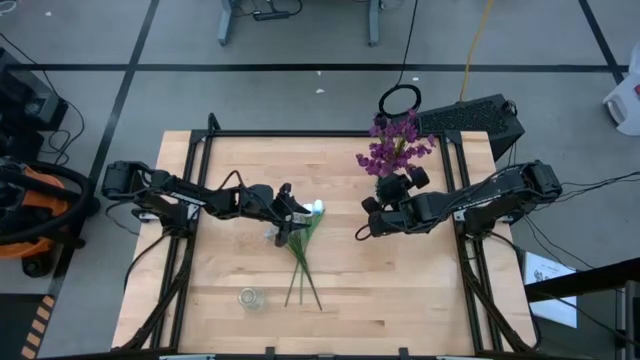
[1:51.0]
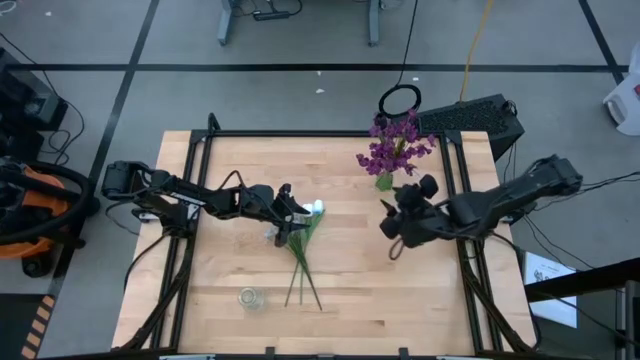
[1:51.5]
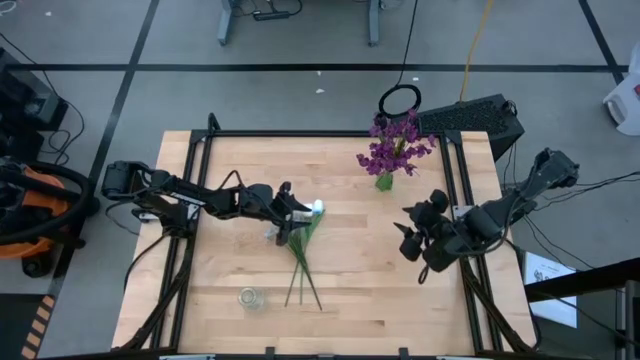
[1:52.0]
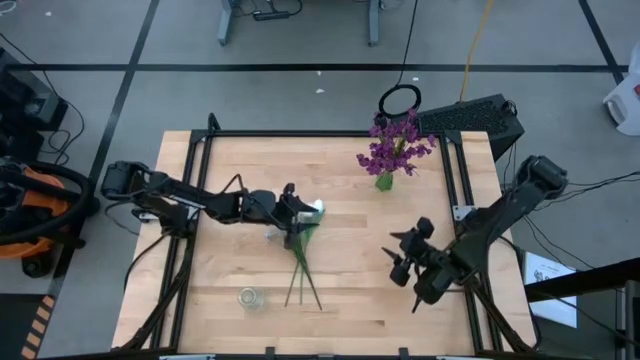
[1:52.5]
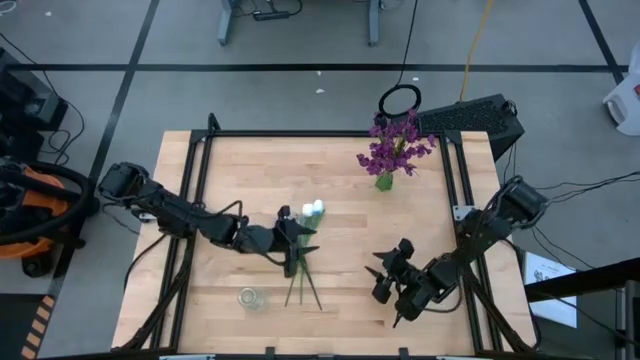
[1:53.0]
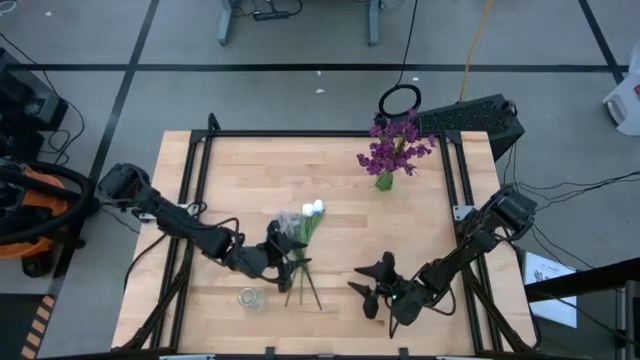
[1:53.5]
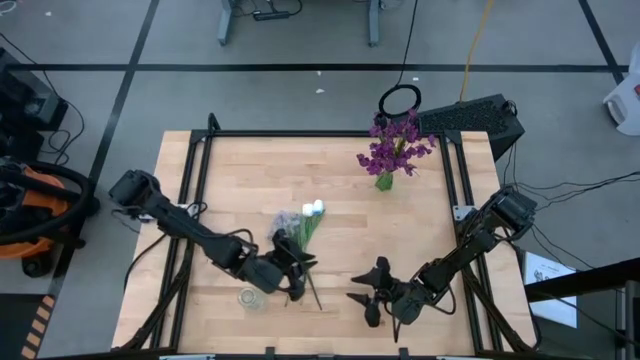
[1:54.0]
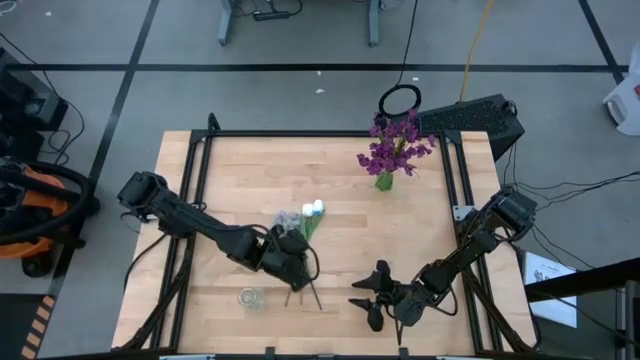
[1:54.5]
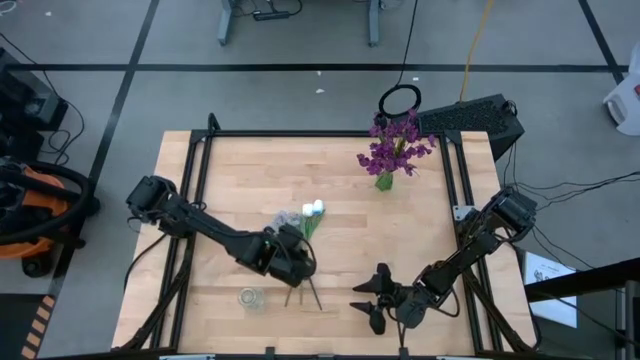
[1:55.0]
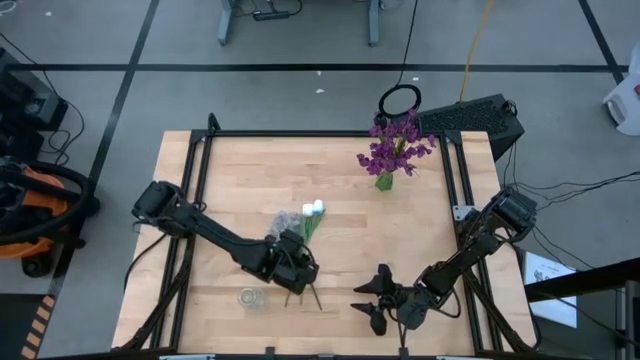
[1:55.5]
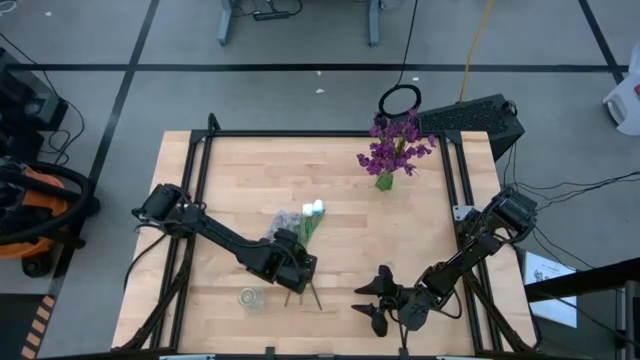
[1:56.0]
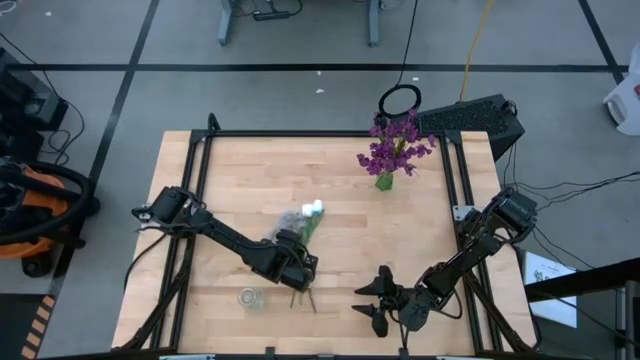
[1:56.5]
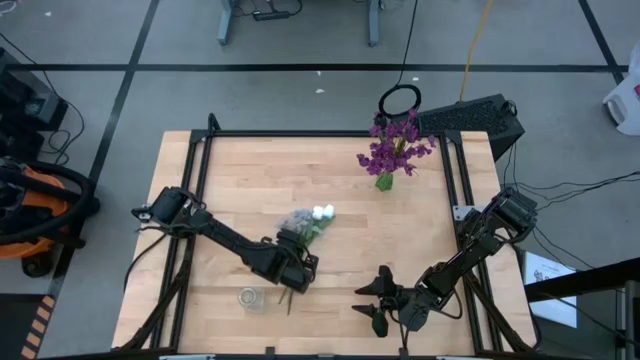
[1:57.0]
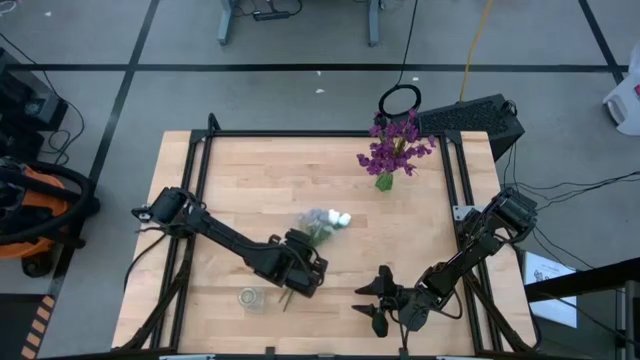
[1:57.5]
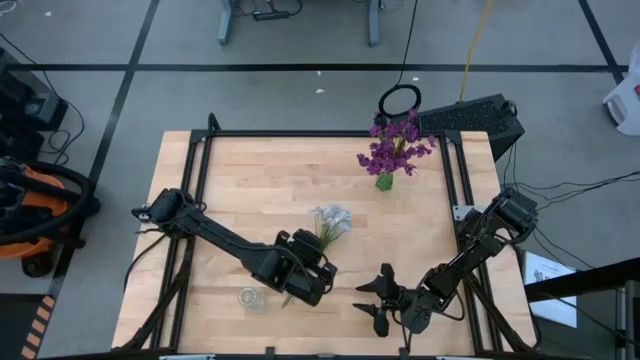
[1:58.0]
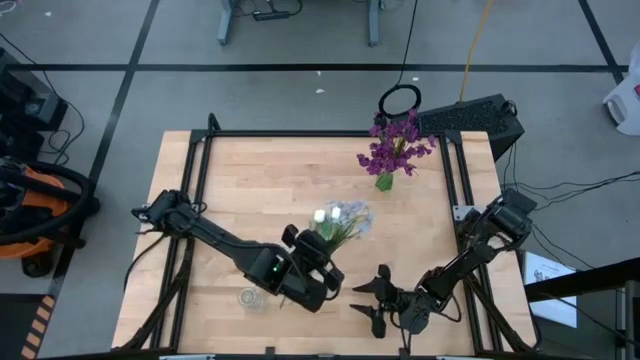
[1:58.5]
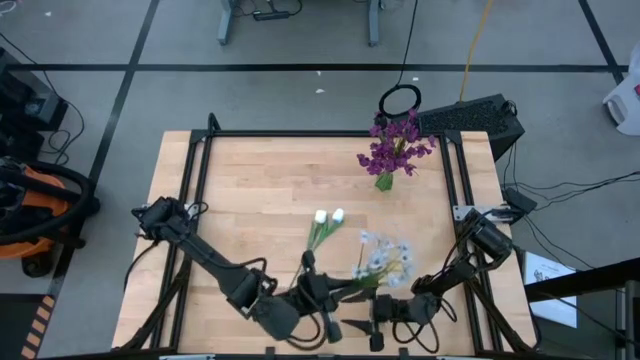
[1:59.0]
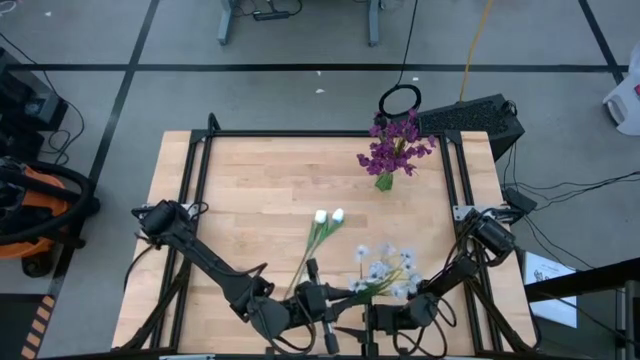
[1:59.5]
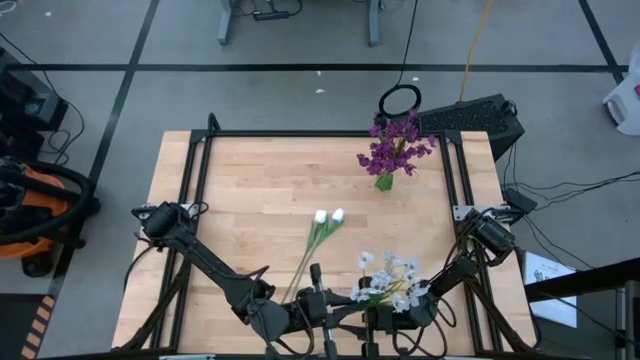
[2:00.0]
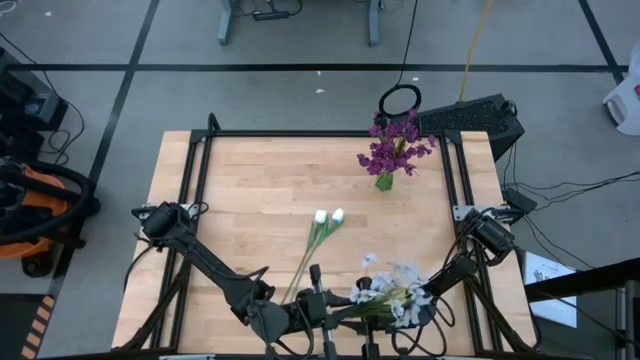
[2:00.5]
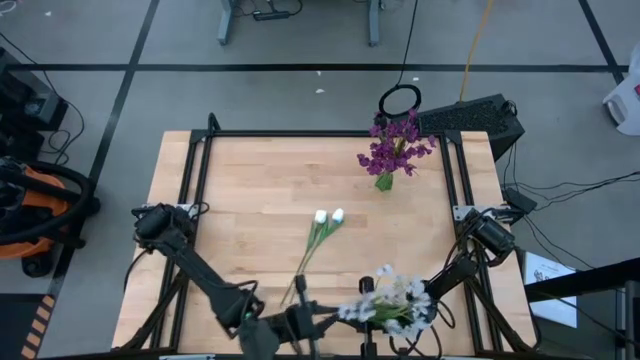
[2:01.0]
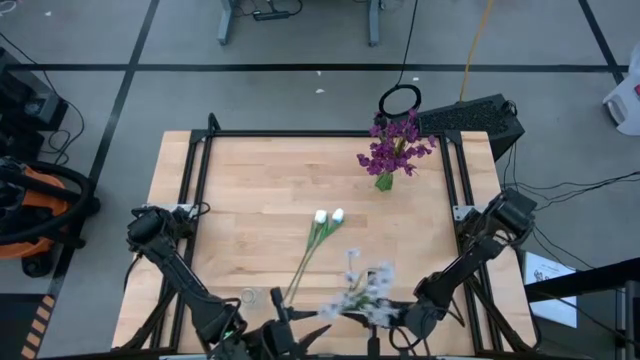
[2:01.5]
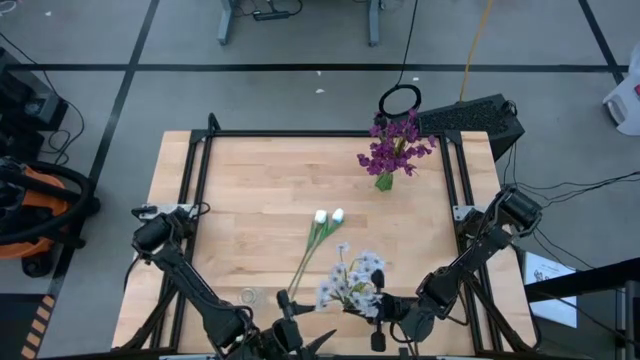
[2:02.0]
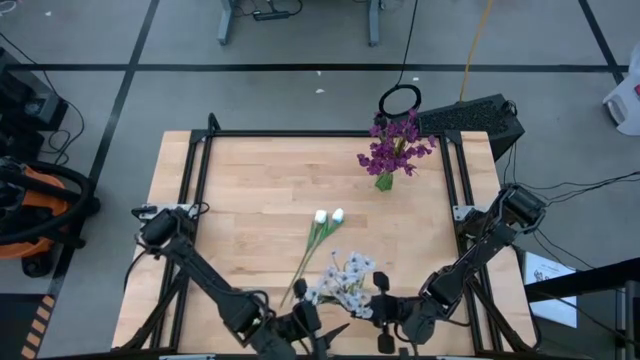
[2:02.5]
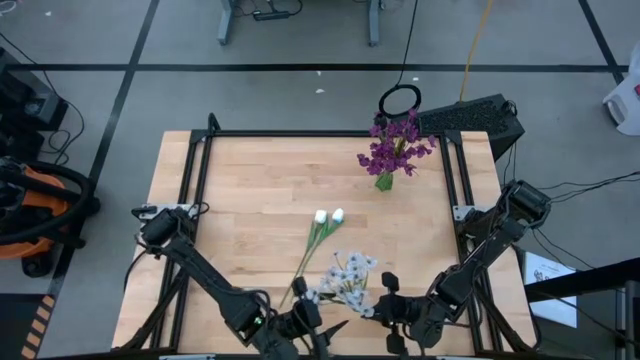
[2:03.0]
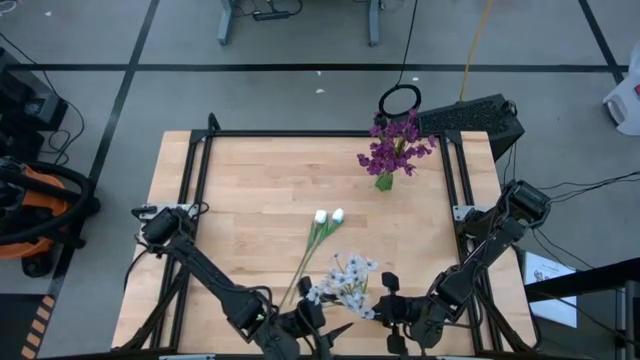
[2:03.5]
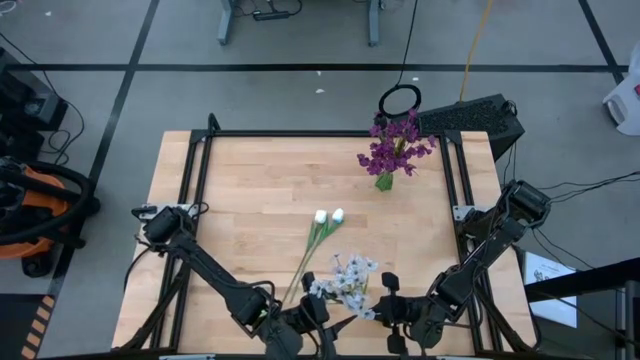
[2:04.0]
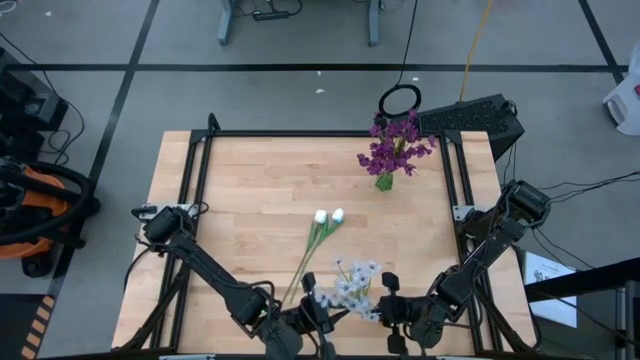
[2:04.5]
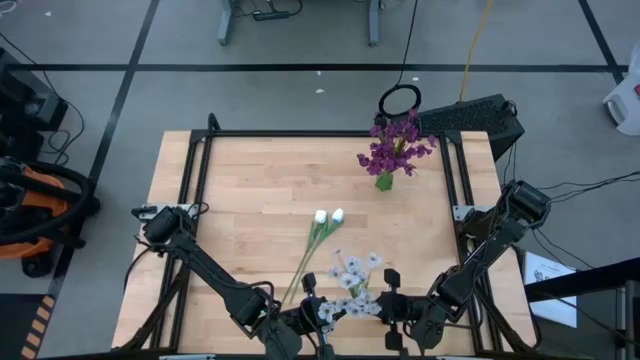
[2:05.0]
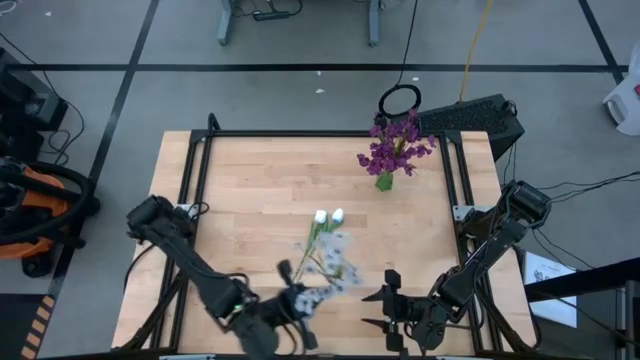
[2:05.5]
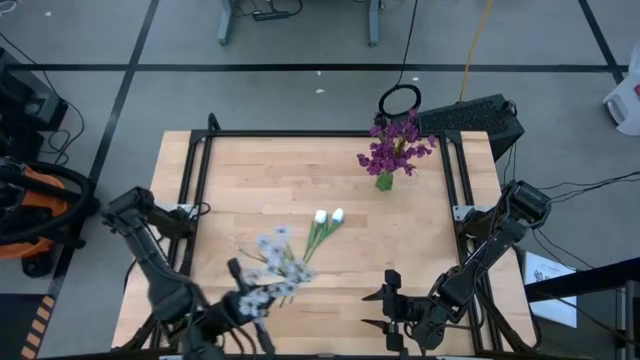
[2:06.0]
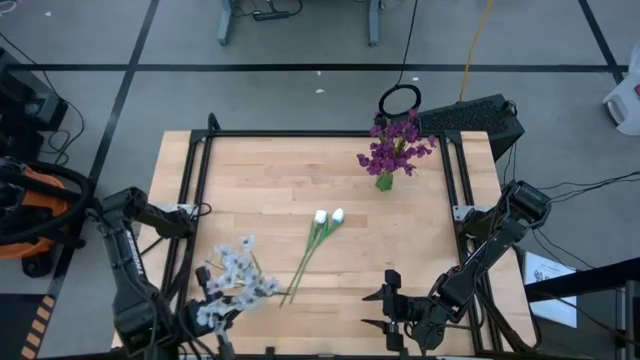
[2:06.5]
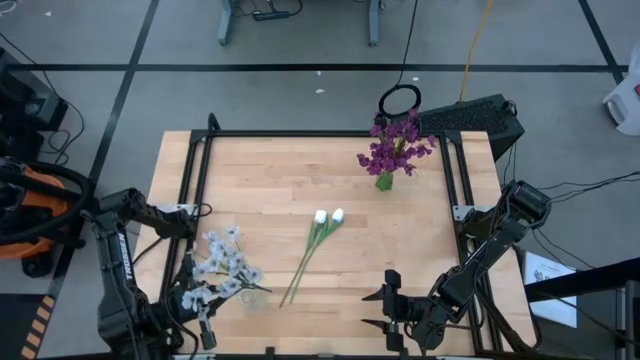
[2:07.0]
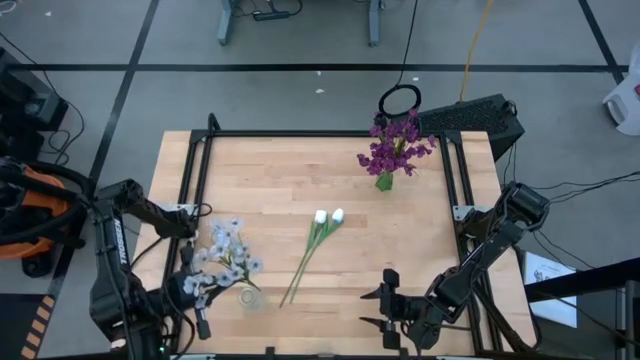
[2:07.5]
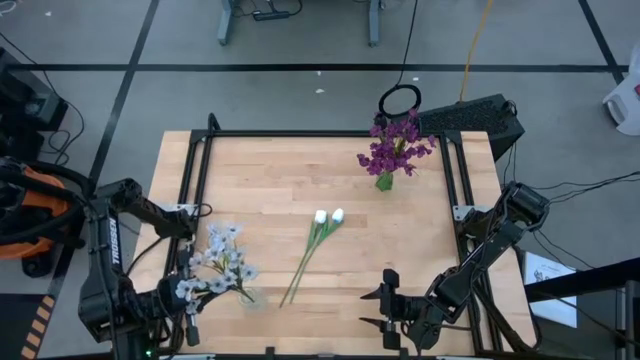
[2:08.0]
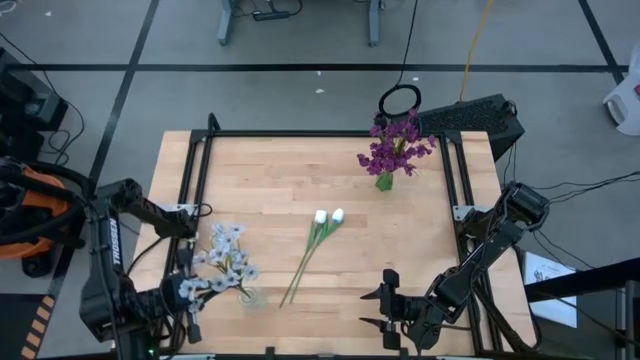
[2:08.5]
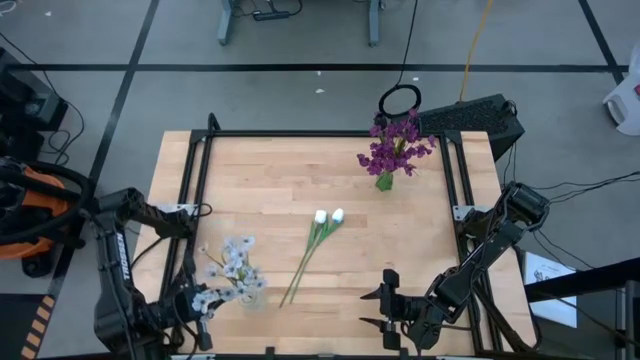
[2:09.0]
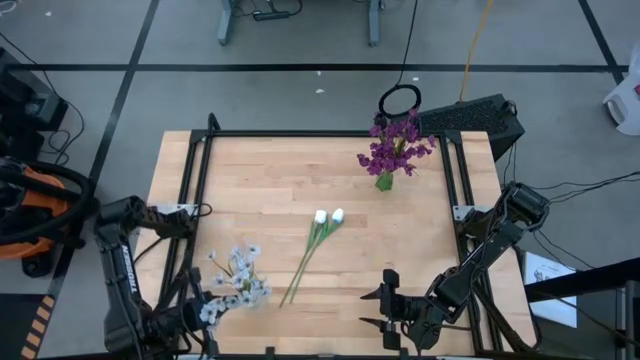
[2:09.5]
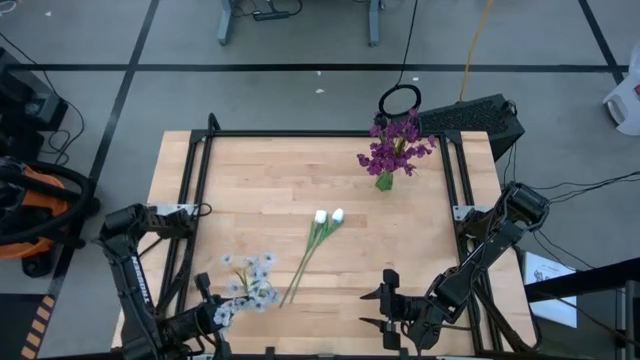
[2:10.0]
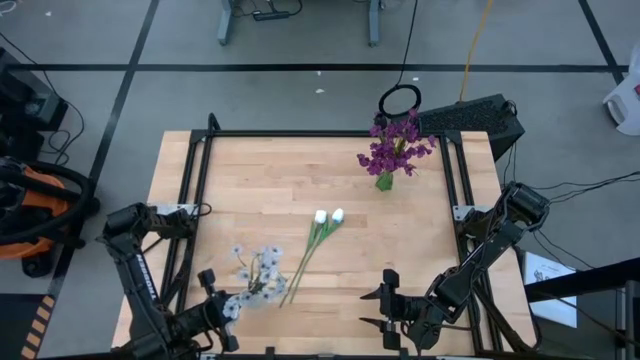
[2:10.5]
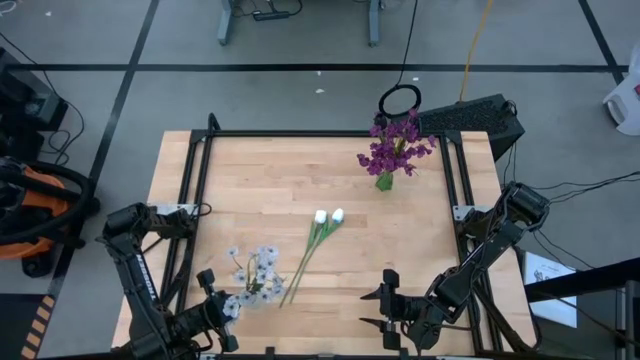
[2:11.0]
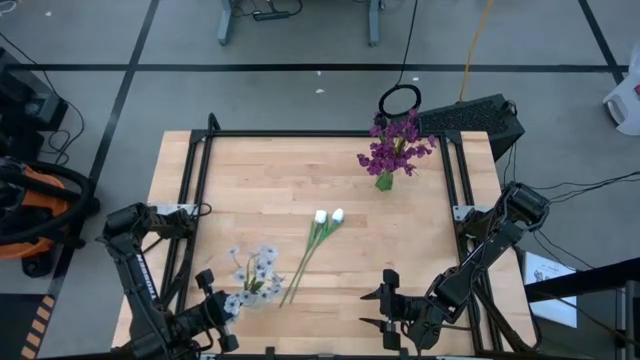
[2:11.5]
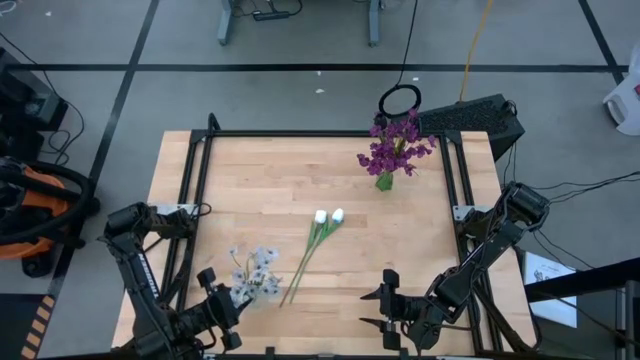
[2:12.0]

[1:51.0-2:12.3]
Task: Sort flowers into vase by color
Put the dark white flower into the transparent vase

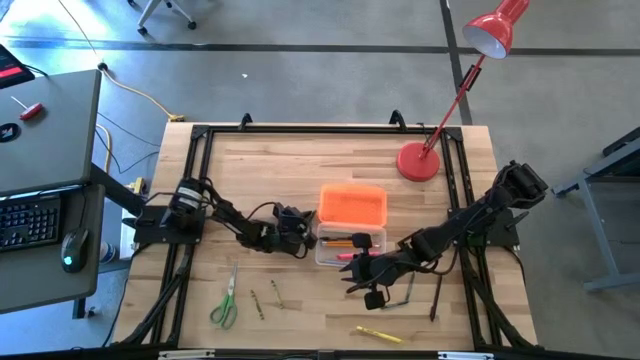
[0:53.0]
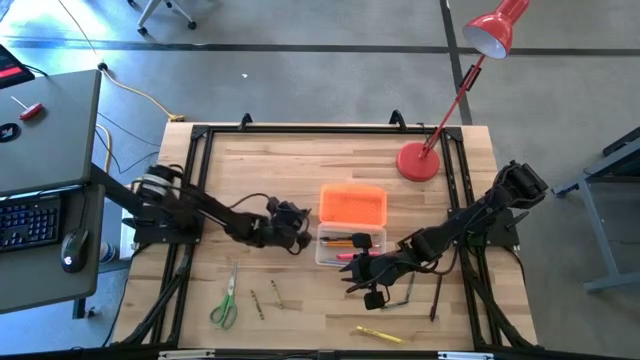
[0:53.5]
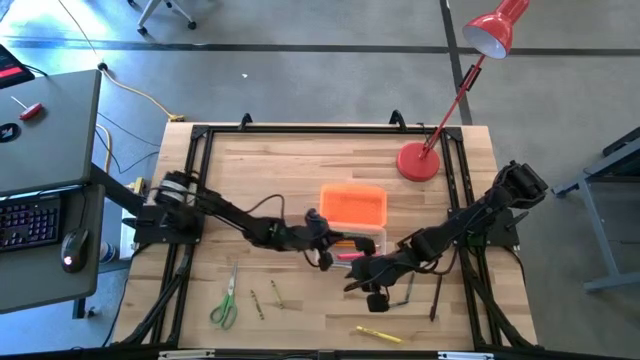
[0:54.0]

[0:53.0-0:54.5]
Task: Pick & place school supplies into a supply box
Put the top dark green crayon into the supply box
